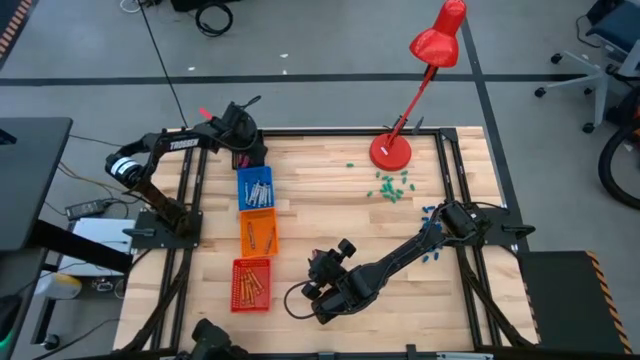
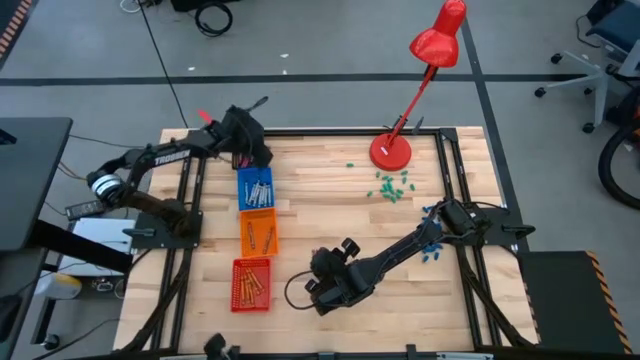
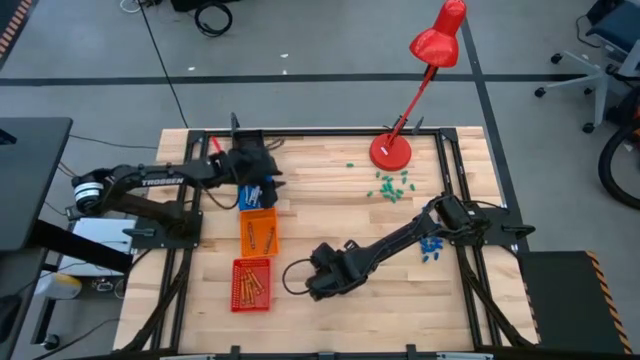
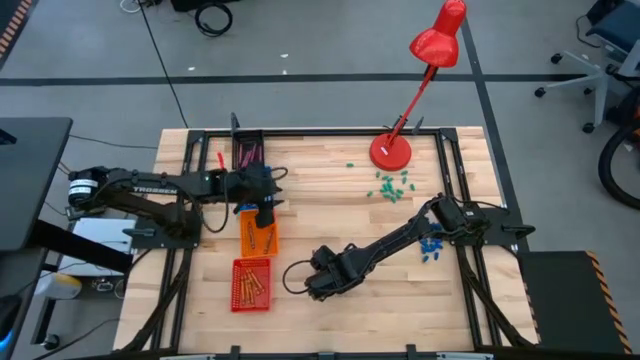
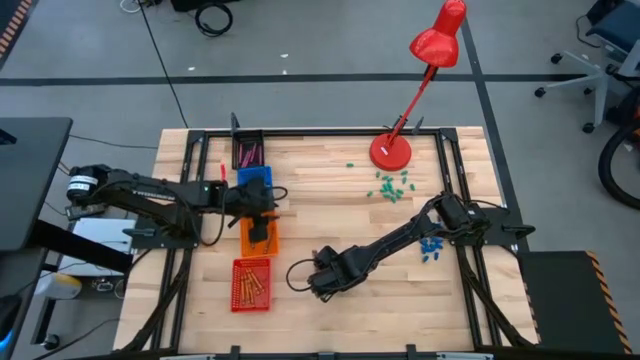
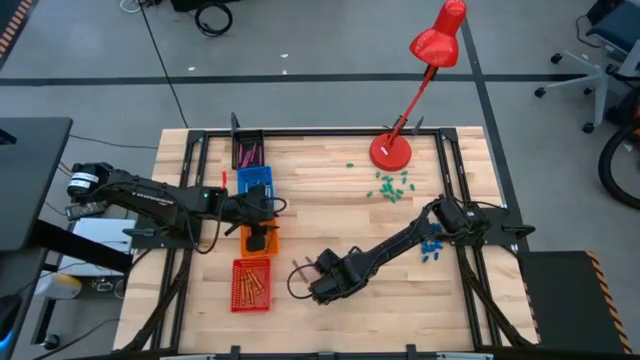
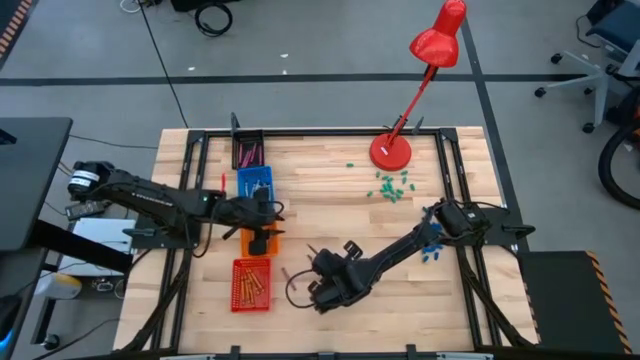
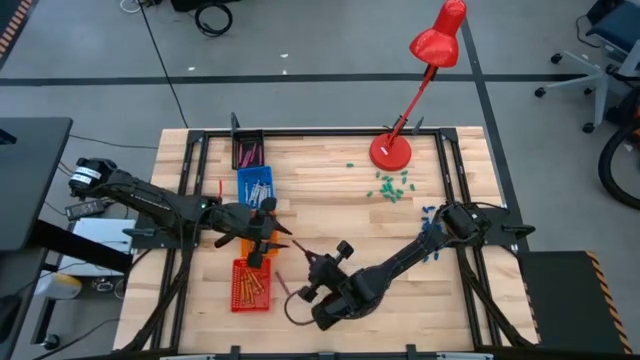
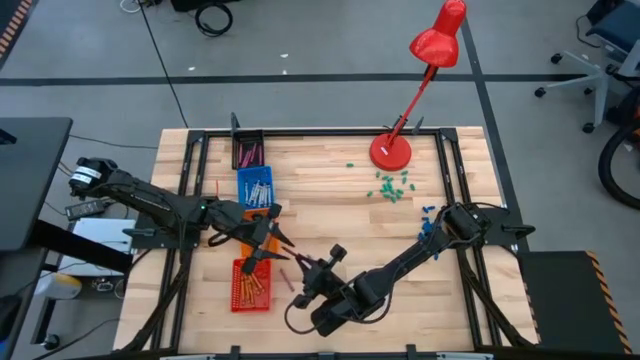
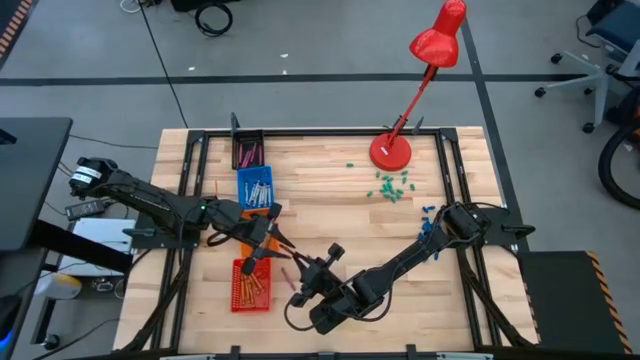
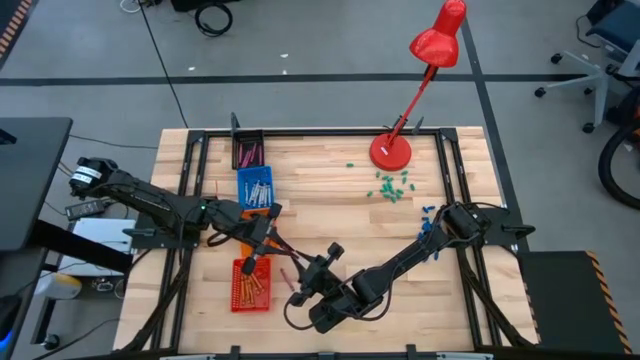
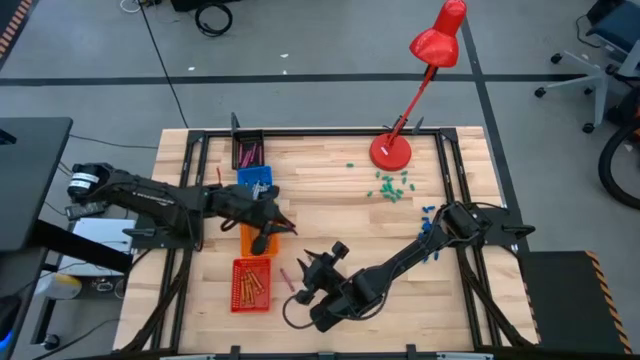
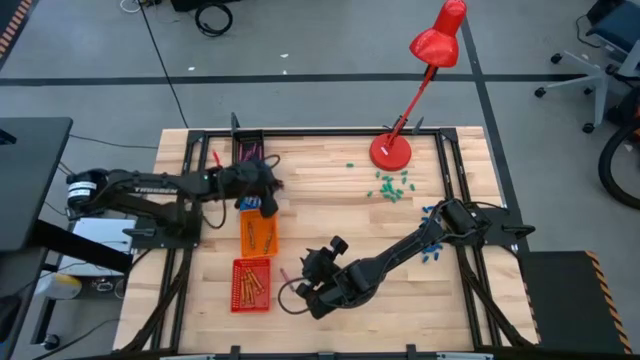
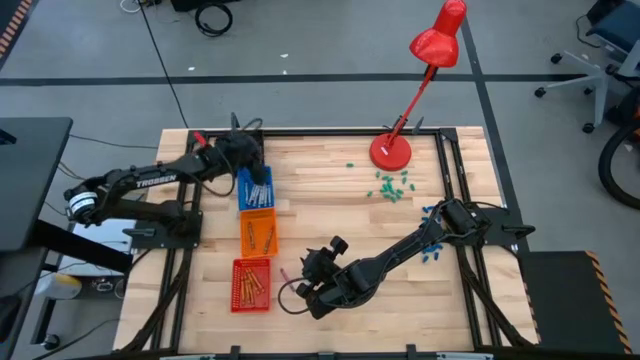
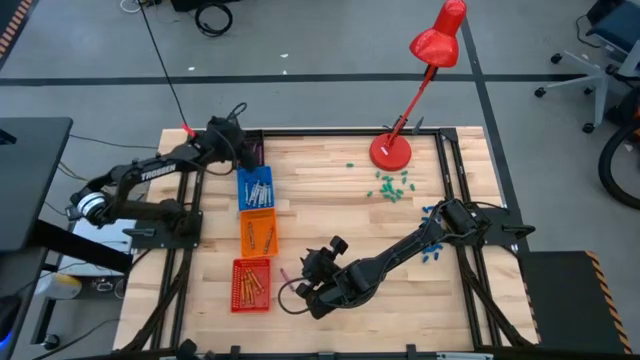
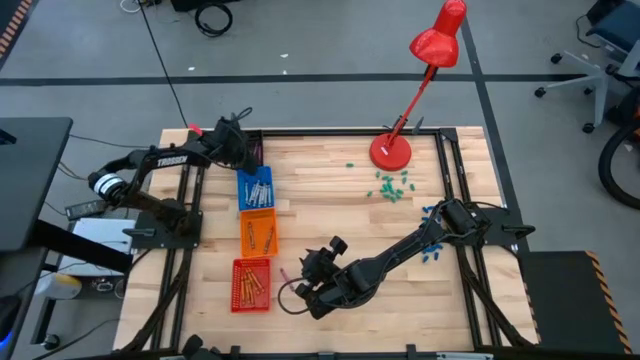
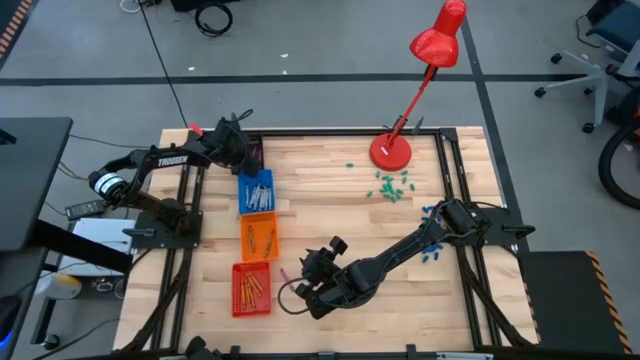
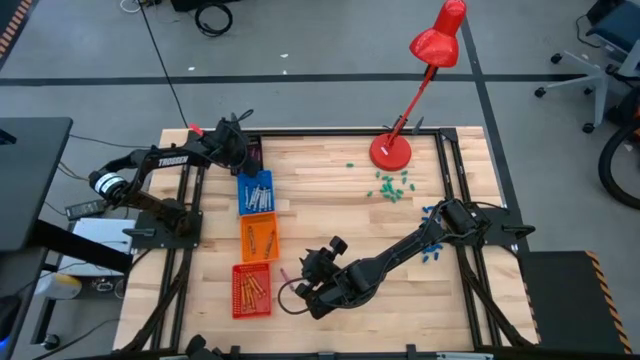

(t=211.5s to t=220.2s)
Task: Sort crayons
Put the pink crayon into the black bin

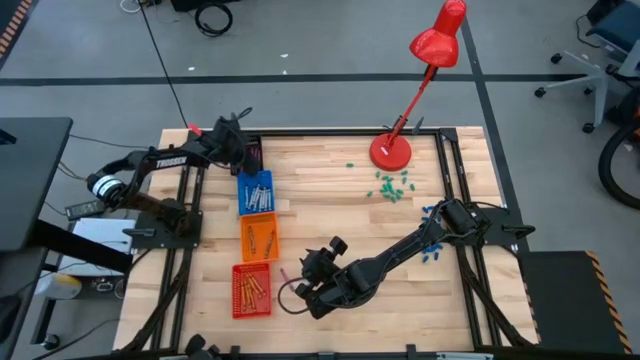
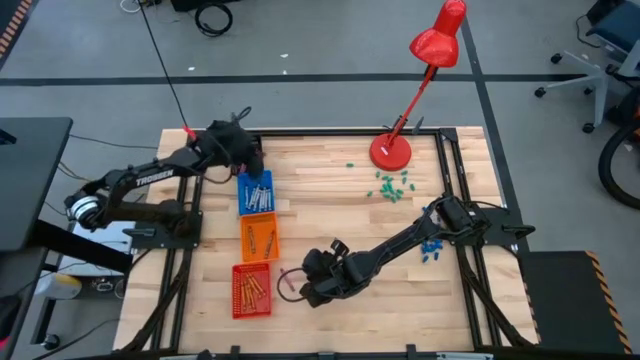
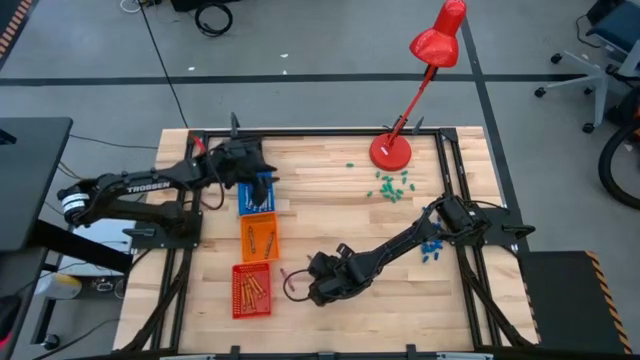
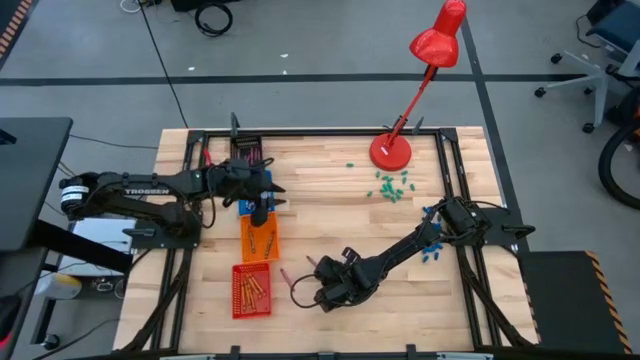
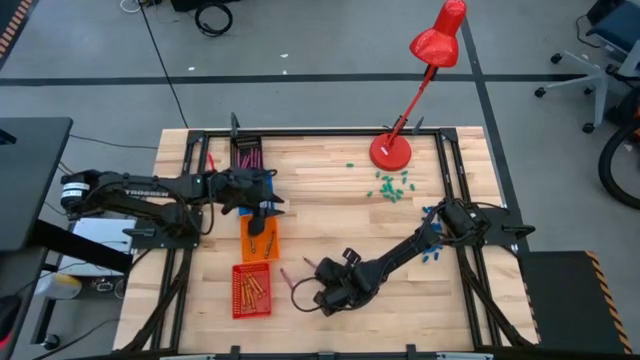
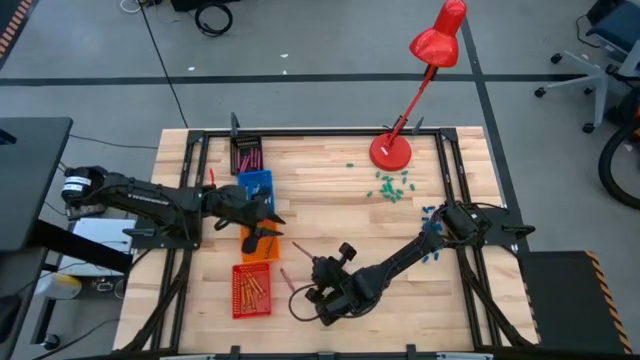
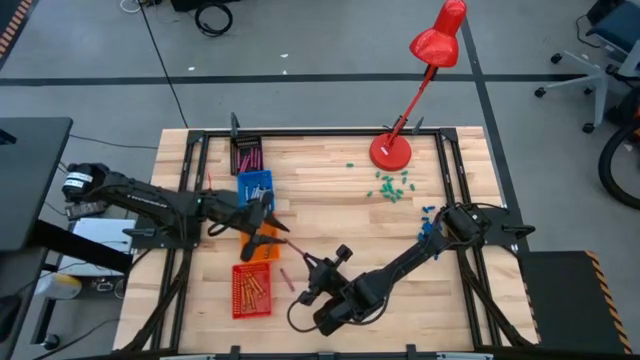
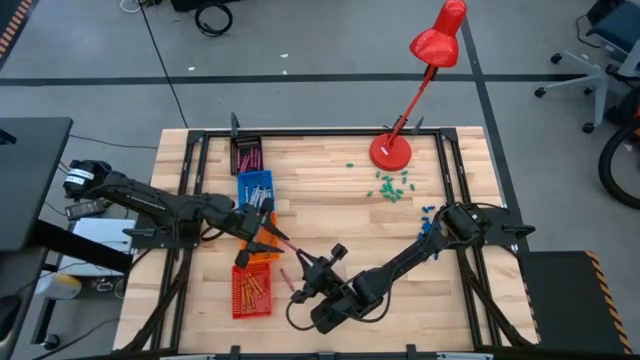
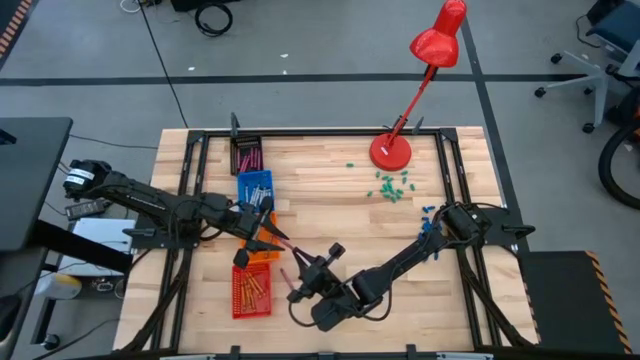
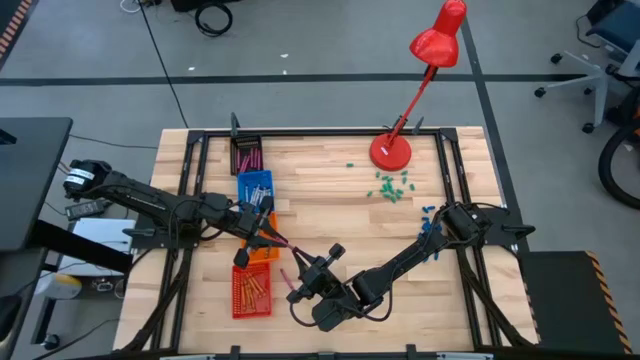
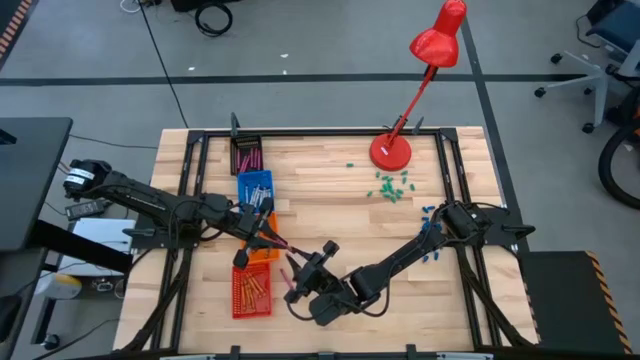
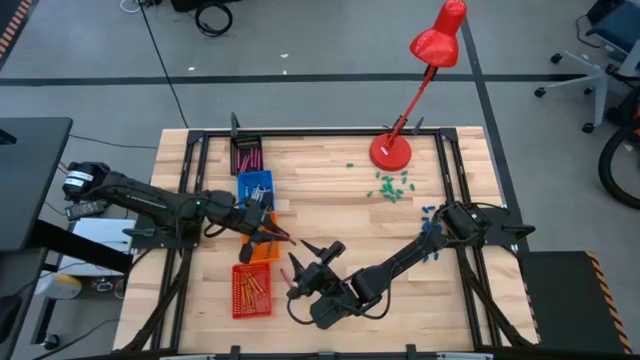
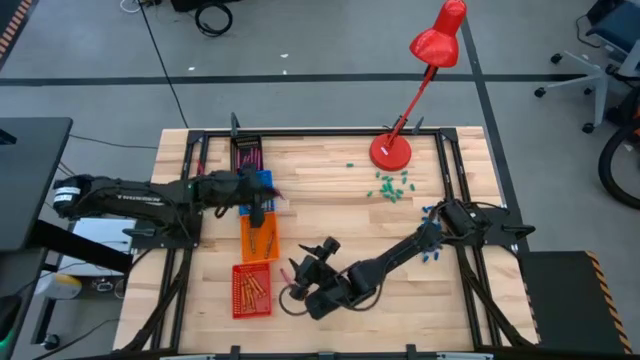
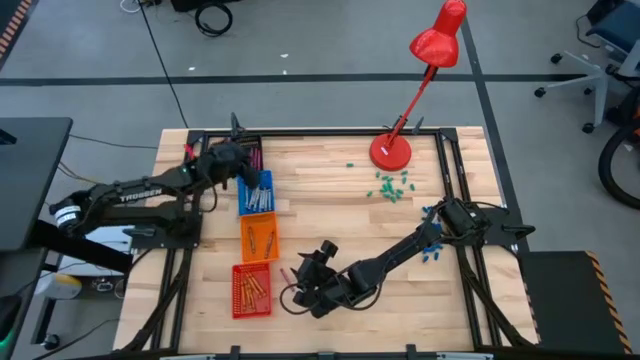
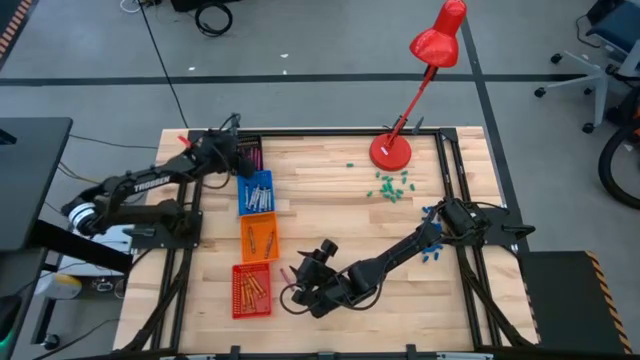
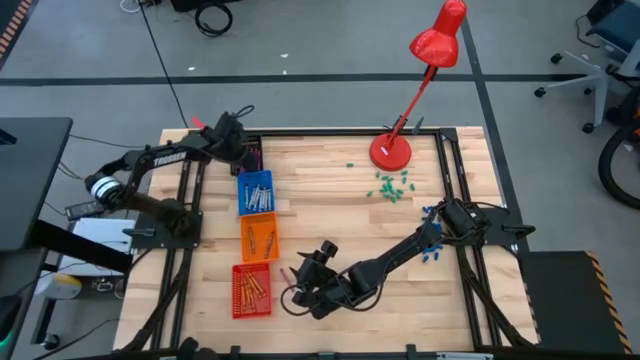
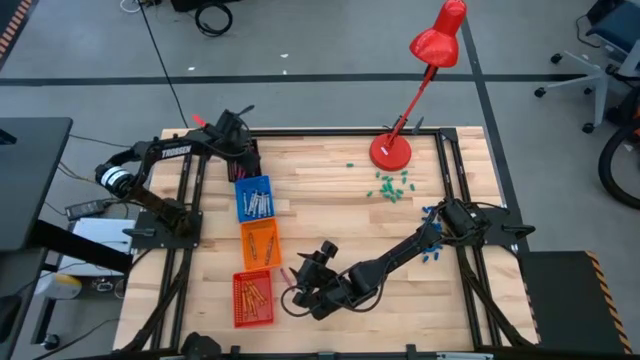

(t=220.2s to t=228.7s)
Put the pink crayon into the black bin
